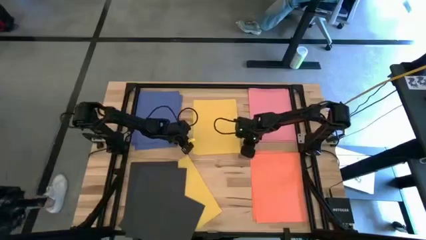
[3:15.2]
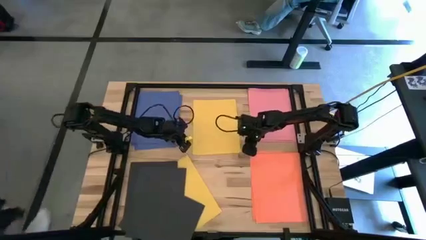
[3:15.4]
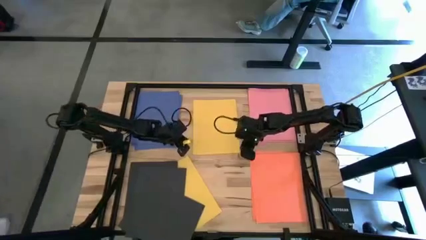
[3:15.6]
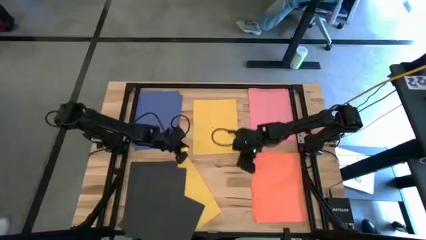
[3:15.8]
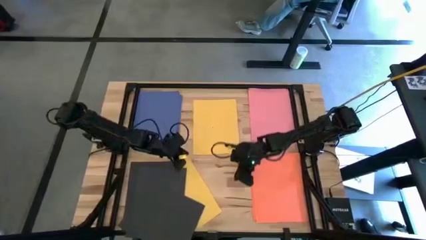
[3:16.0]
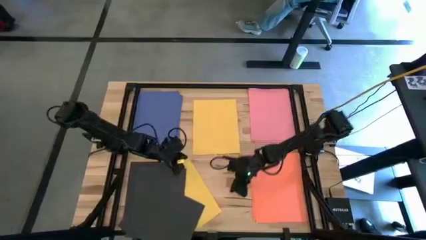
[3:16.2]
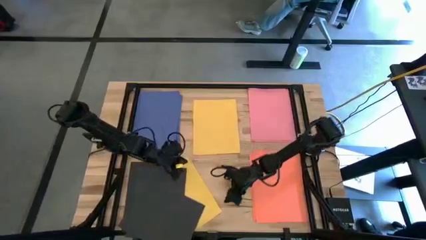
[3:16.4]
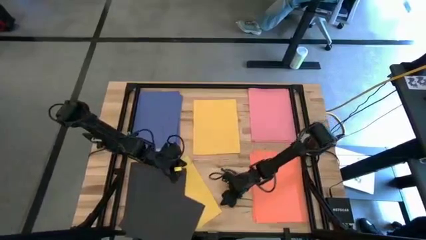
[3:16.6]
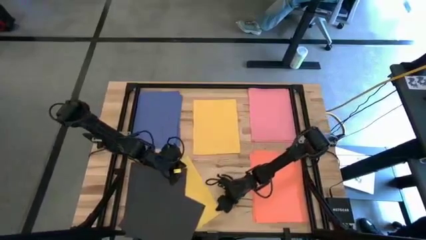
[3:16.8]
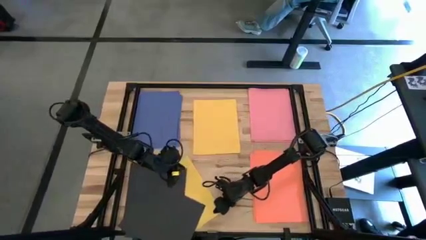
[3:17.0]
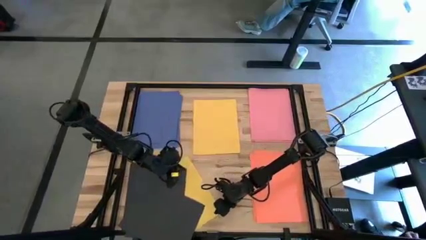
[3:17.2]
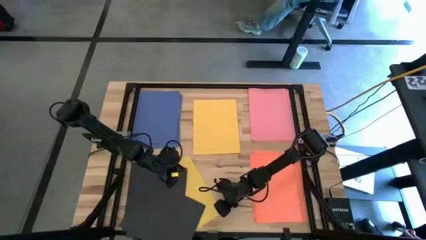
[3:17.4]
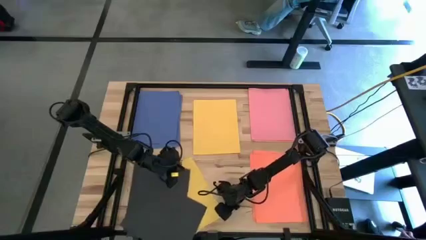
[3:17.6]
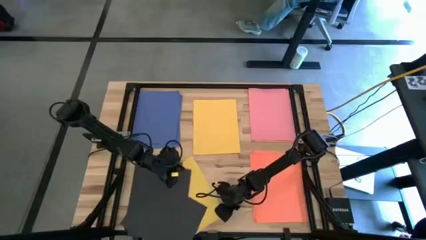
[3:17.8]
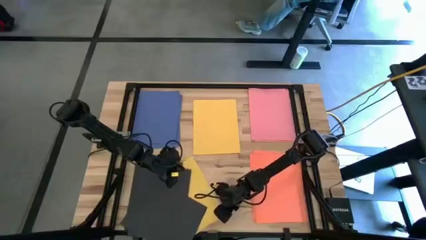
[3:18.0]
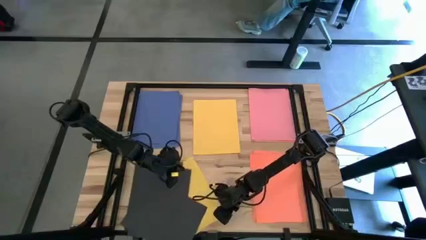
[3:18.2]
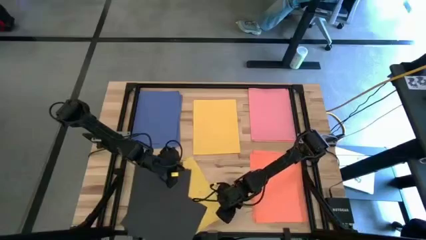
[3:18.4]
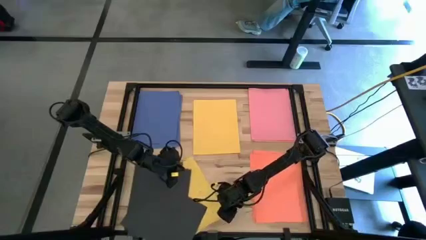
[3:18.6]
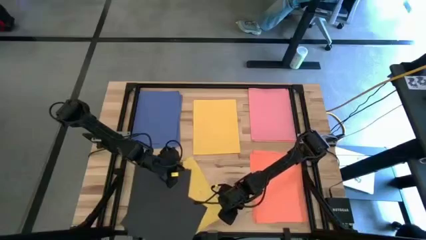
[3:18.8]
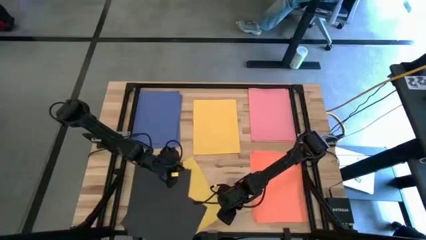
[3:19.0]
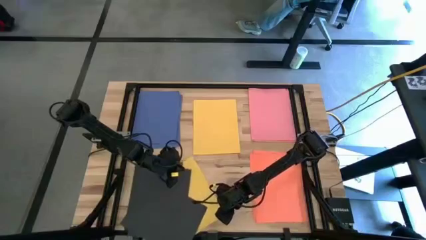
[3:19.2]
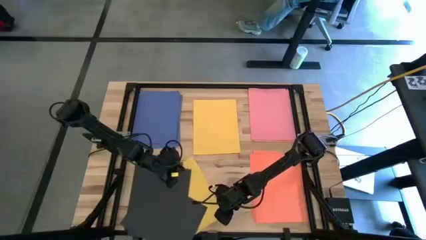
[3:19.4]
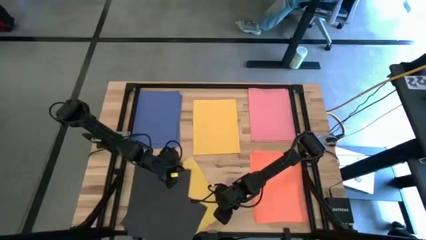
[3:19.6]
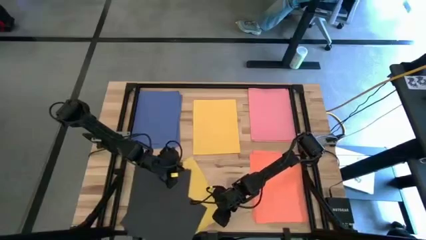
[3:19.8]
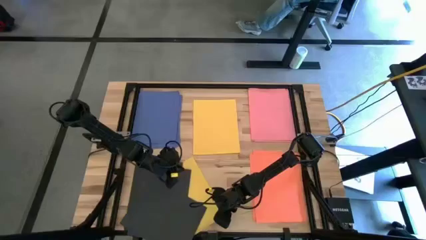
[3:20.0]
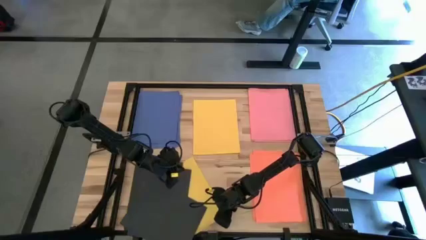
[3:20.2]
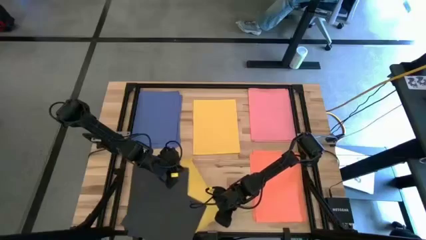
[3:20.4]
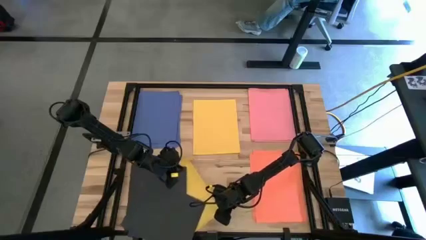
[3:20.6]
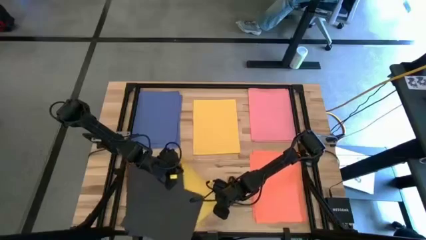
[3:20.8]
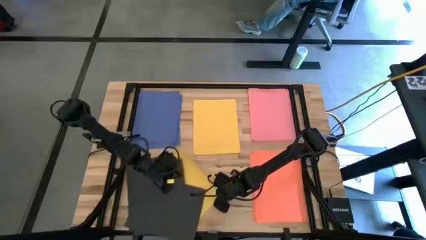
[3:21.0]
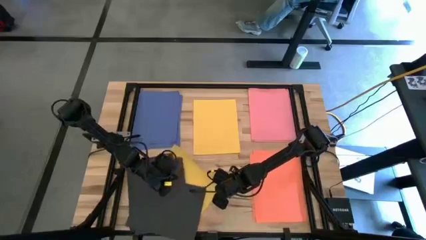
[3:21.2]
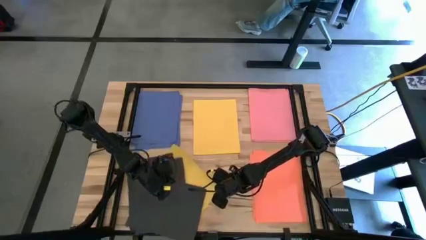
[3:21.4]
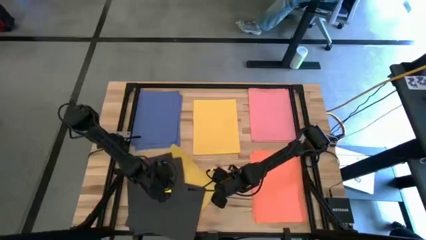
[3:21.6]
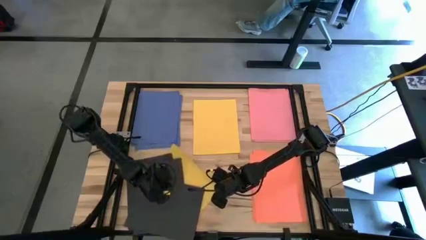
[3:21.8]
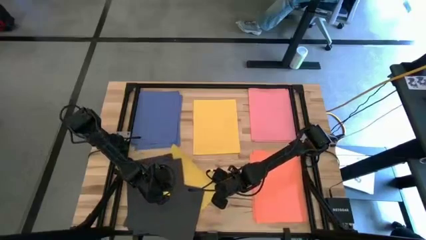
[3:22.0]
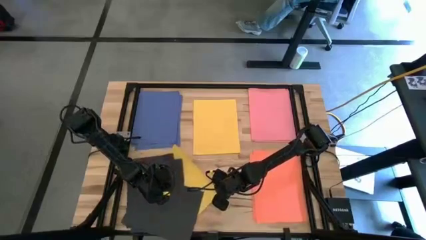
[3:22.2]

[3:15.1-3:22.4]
Task: Organize paper
Stack the yellow paper on top of the top yellow paper

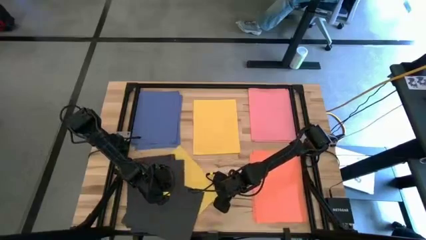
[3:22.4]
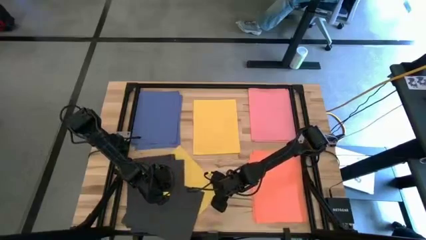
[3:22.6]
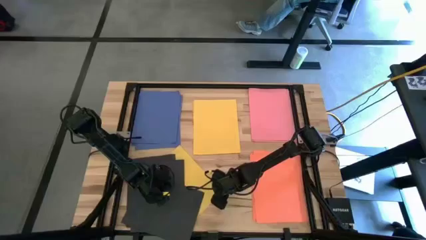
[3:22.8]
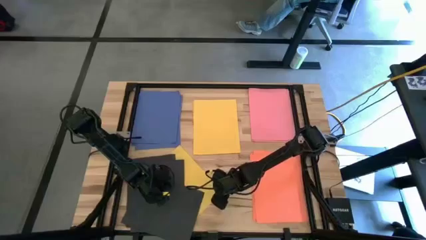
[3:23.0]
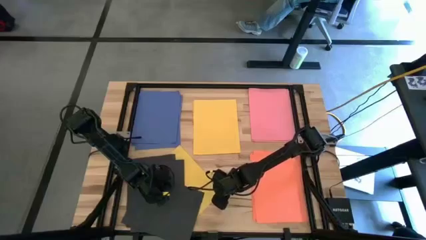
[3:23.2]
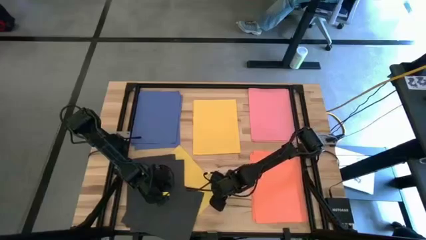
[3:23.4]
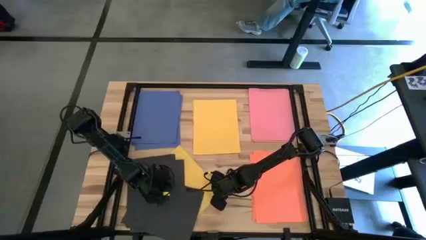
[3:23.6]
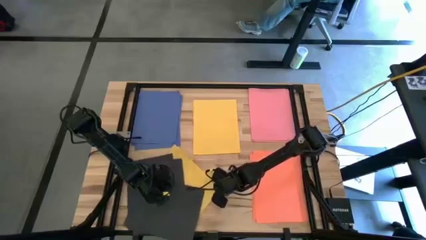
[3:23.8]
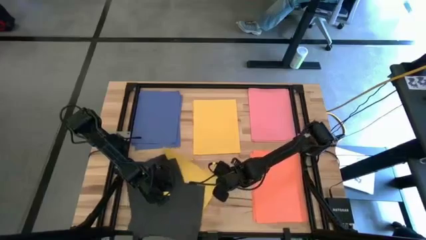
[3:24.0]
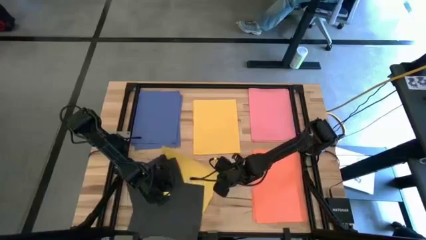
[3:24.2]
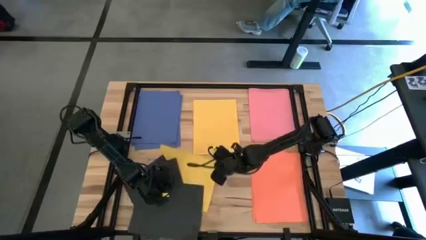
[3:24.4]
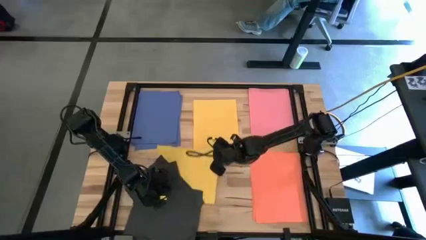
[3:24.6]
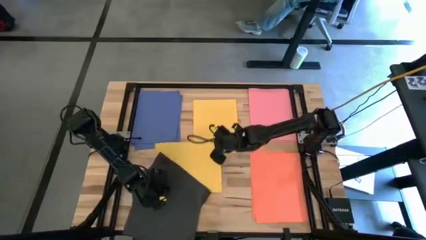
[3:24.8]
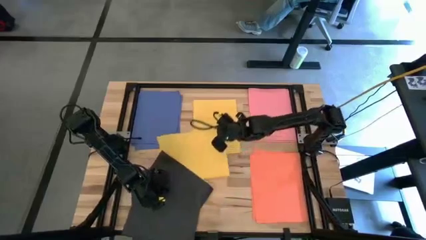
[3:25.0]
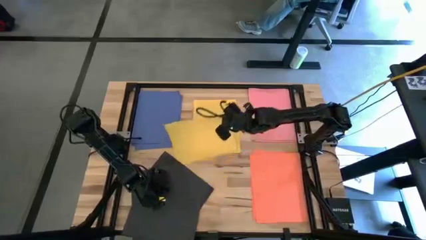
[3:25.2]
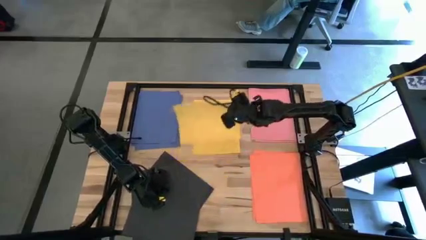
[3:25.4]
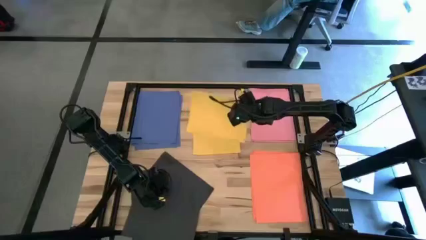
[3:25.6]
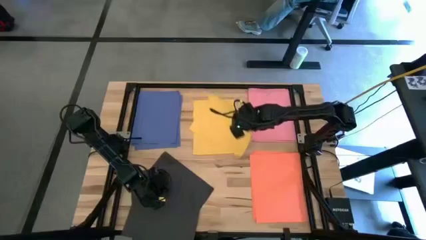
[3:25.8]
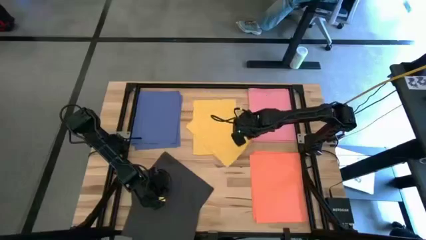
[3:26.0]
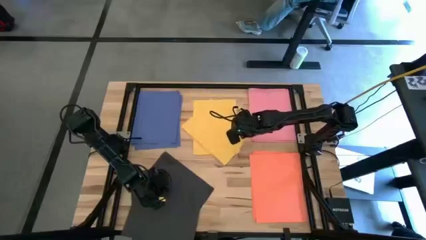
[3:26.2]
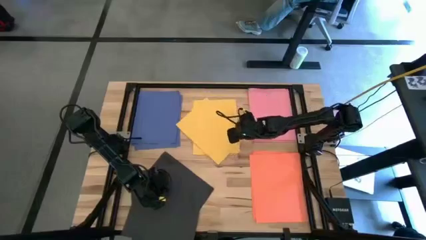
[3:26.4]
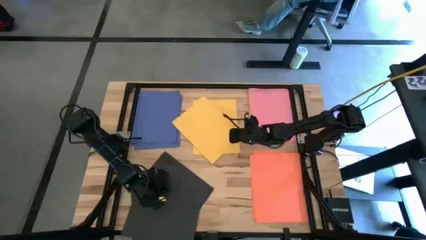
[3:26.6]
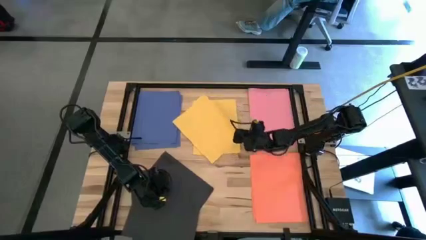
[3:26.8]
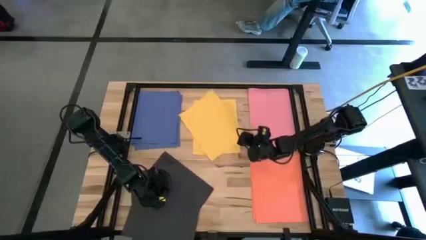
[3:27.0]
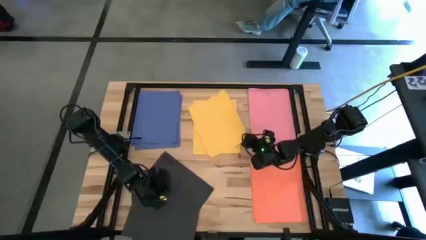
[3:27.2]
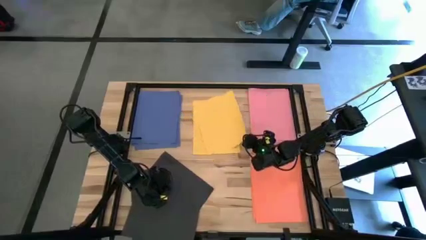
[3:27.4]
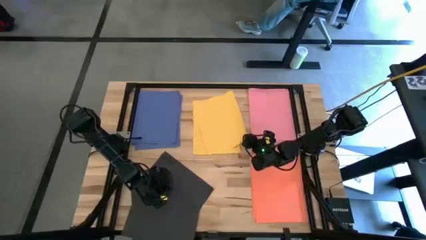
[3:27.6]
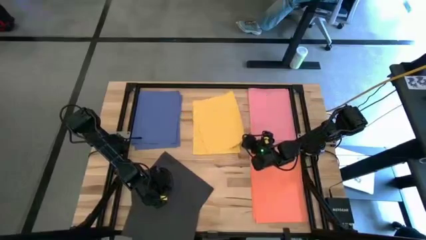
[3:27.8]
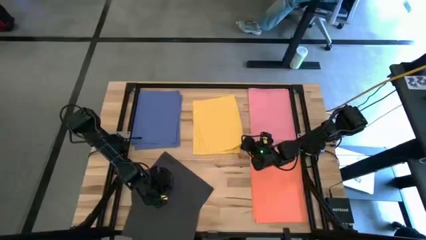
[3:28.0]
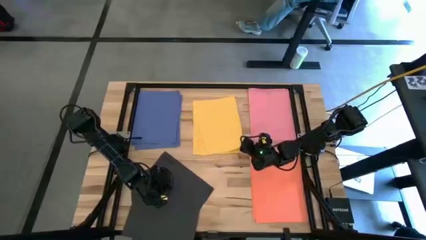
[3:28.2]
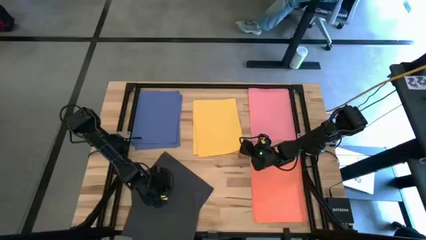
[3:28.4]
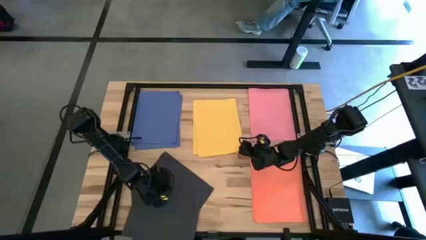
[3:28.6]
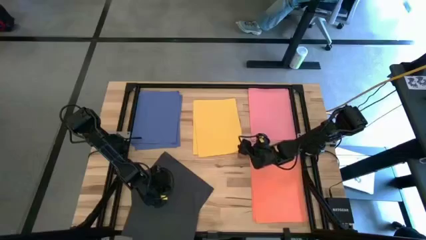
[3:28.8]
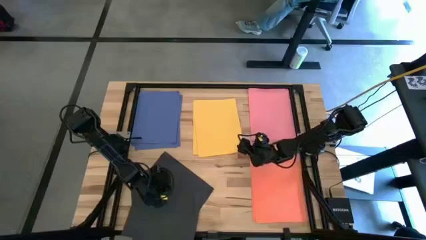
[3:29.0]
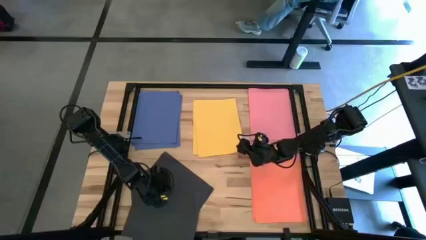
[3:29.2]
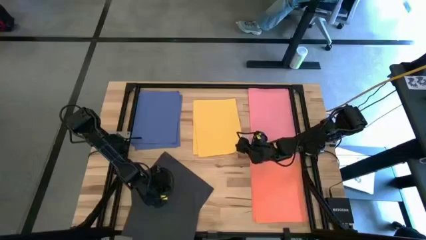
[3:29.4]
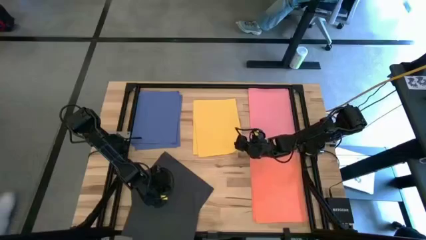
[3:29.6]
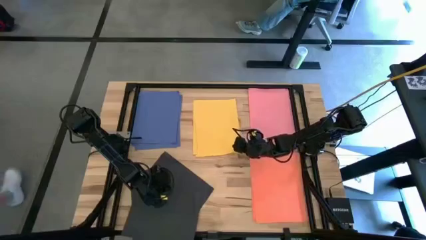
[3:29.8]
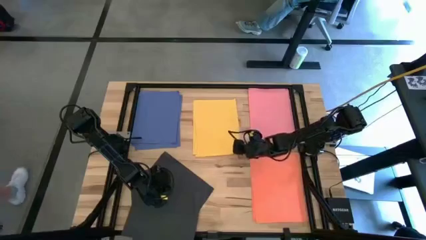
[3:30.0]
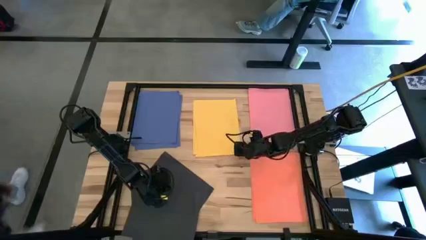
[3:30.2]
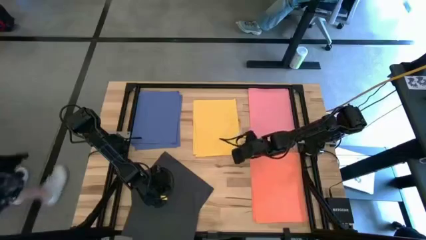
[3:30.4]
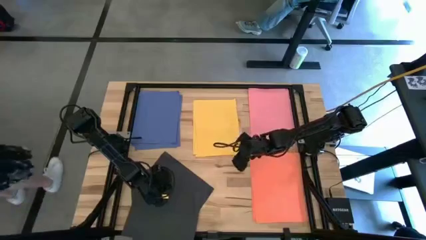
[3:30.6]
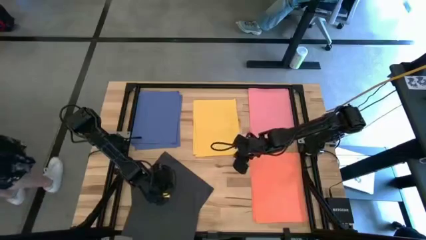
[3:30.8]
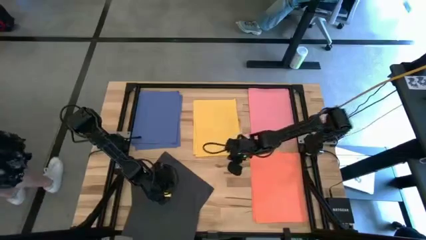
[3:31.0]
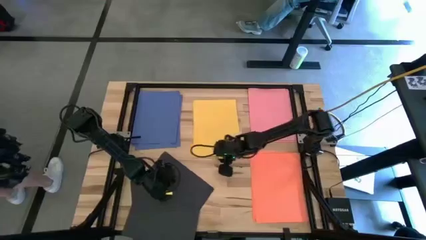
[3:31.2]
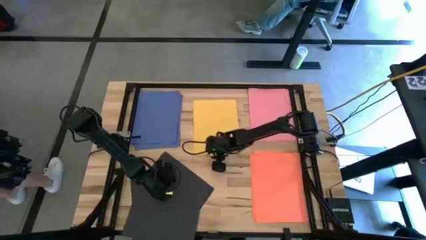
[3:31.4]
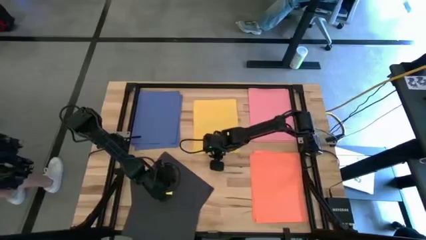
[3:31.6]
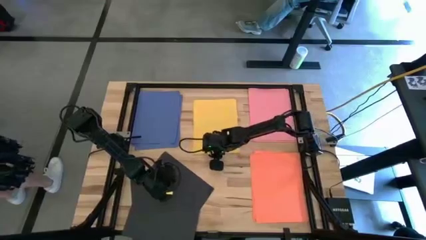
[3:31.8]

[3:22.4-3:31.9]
Stack the yellow paper on top of the top yellow paper
